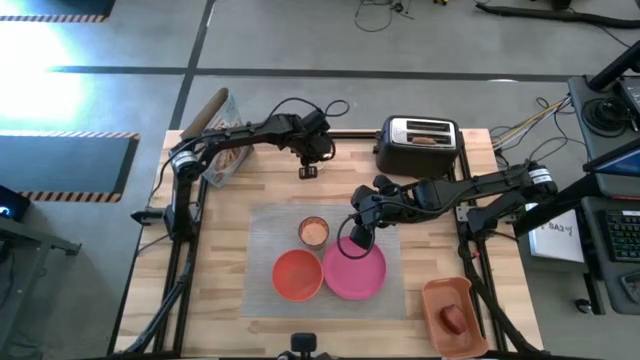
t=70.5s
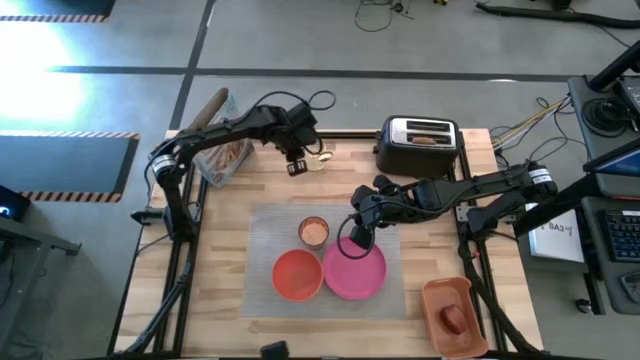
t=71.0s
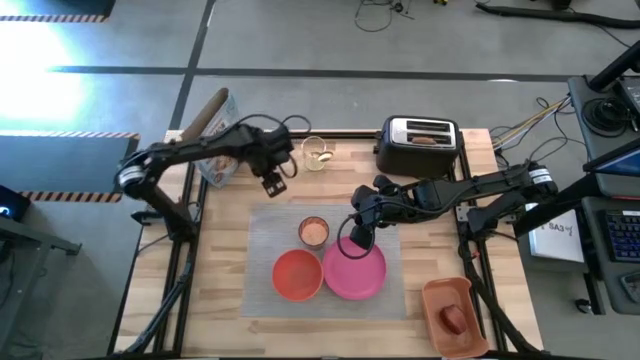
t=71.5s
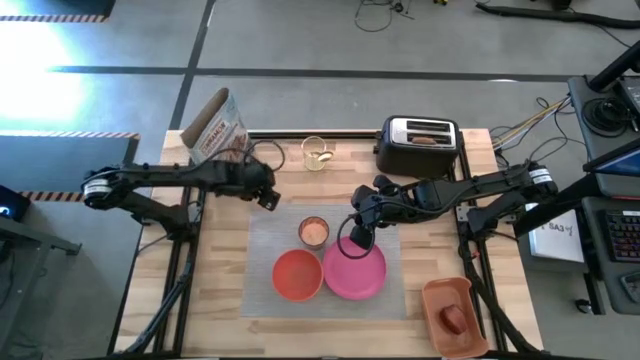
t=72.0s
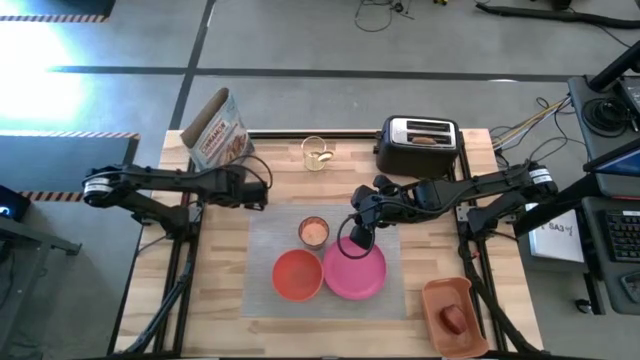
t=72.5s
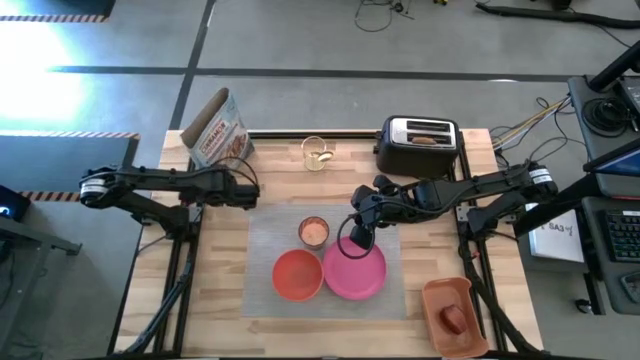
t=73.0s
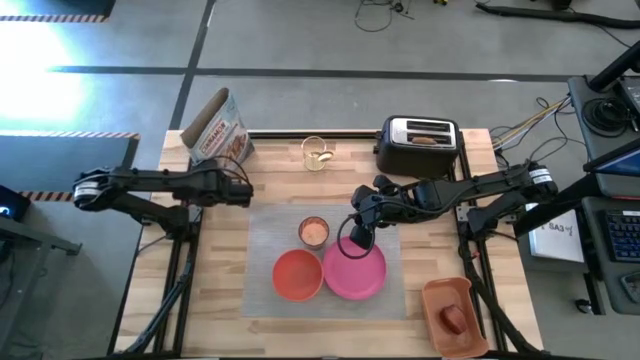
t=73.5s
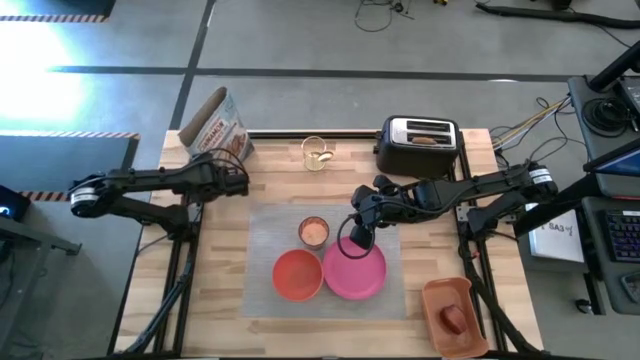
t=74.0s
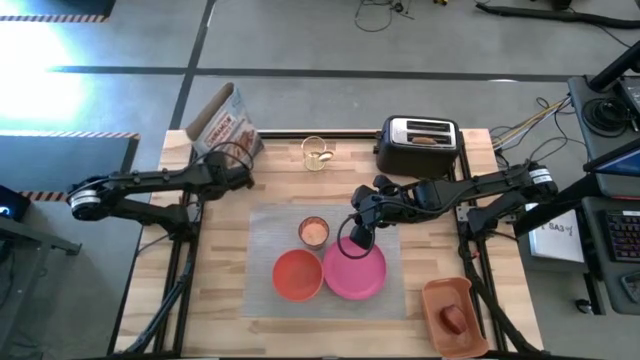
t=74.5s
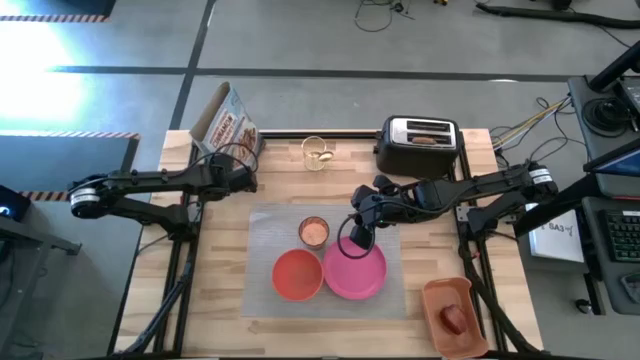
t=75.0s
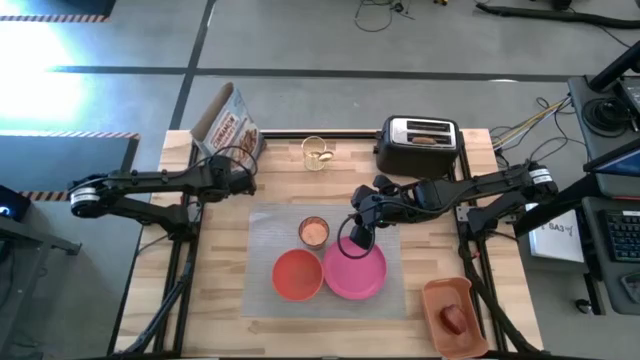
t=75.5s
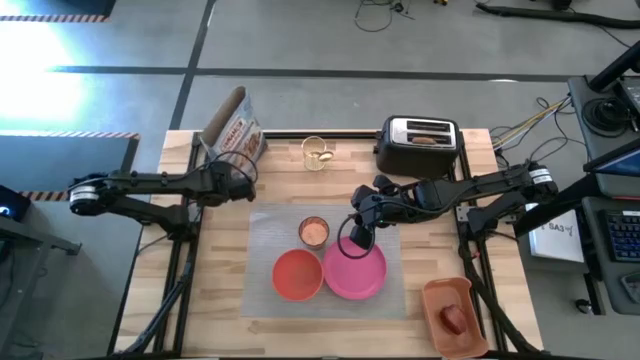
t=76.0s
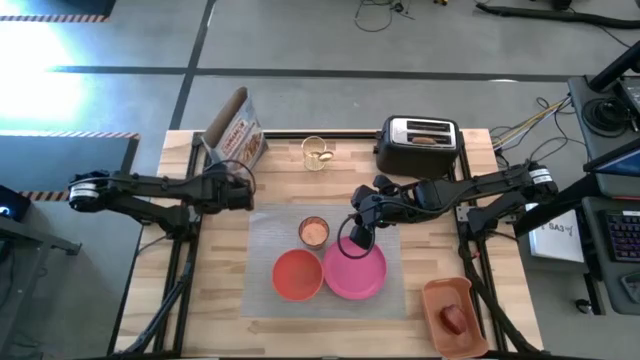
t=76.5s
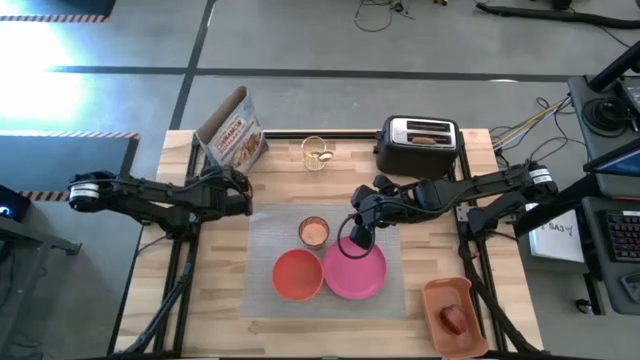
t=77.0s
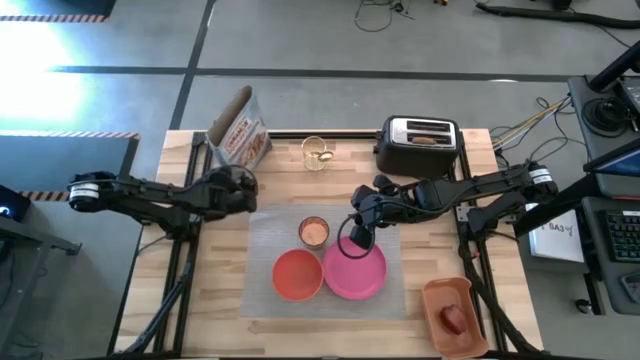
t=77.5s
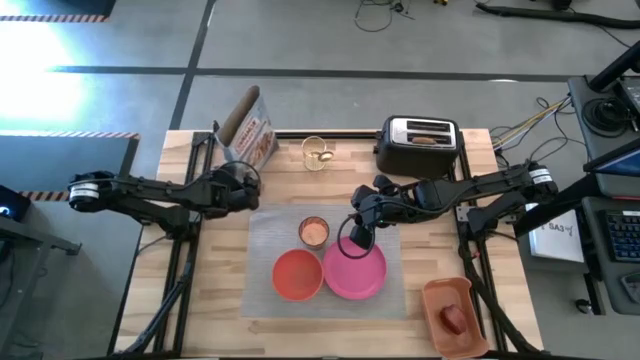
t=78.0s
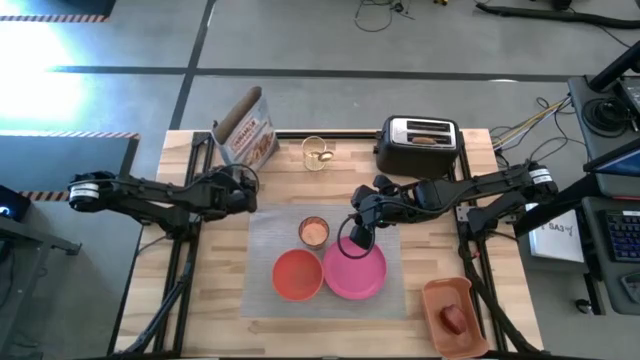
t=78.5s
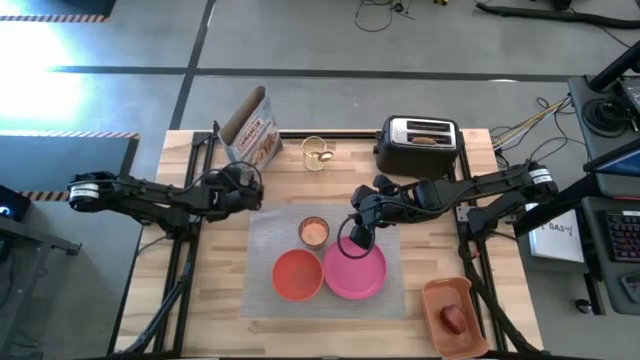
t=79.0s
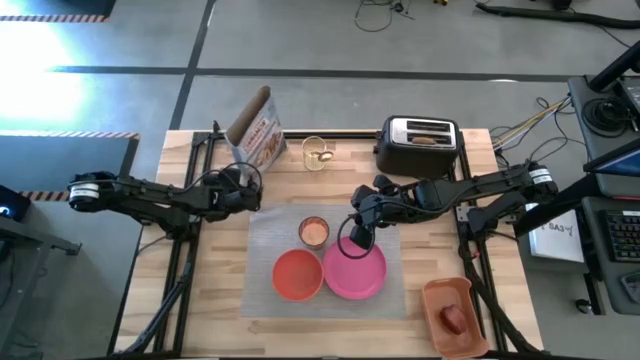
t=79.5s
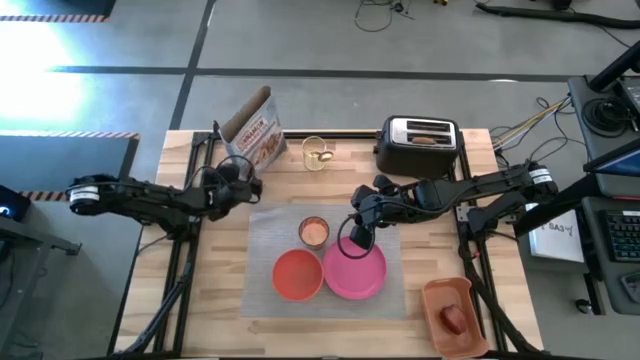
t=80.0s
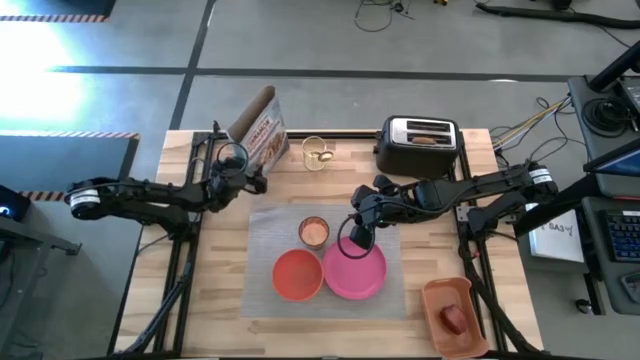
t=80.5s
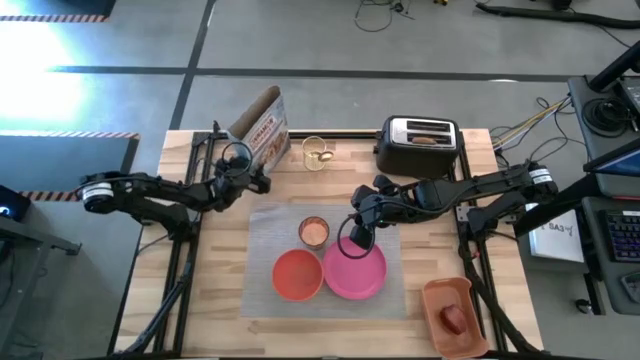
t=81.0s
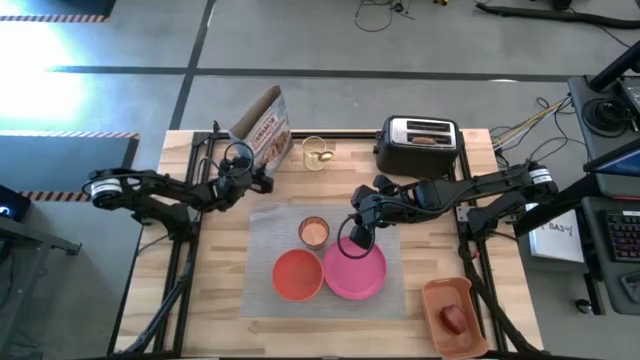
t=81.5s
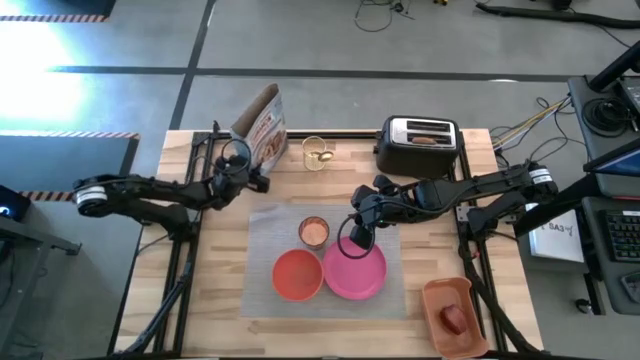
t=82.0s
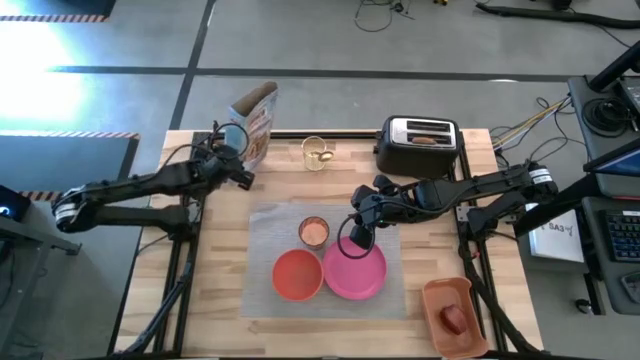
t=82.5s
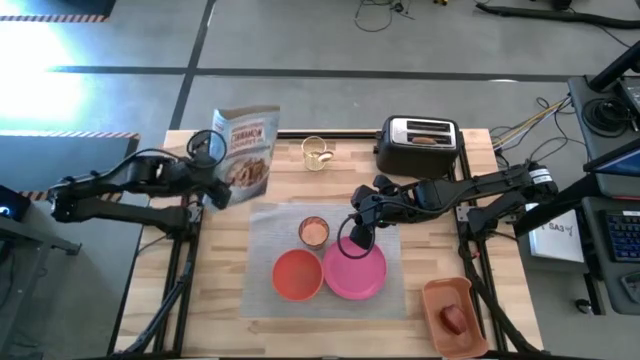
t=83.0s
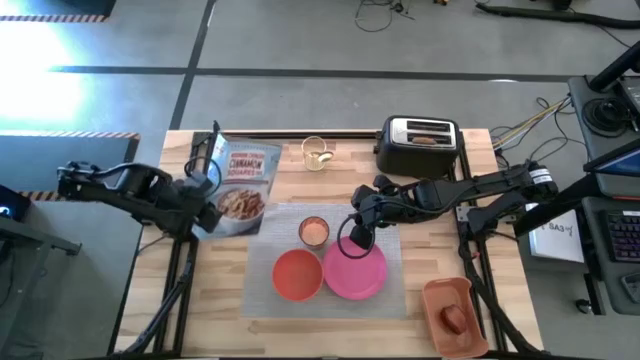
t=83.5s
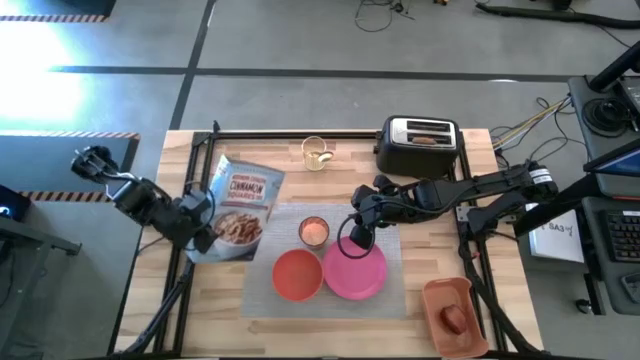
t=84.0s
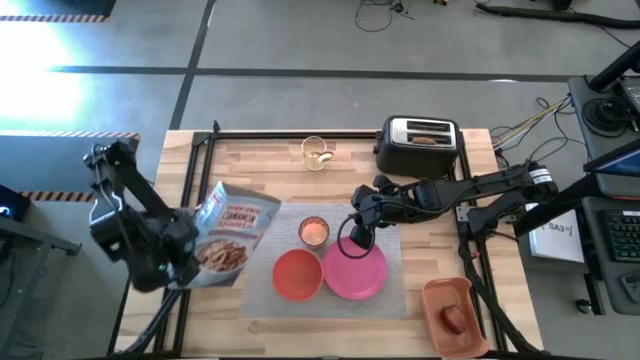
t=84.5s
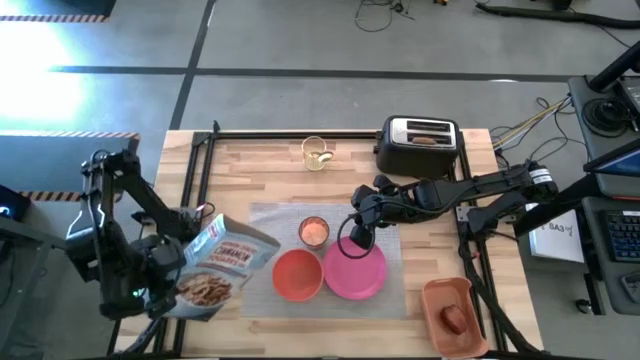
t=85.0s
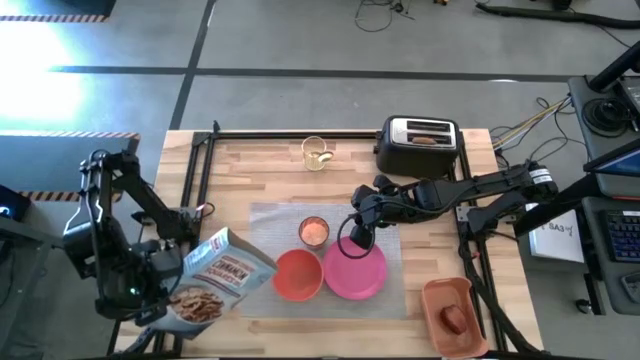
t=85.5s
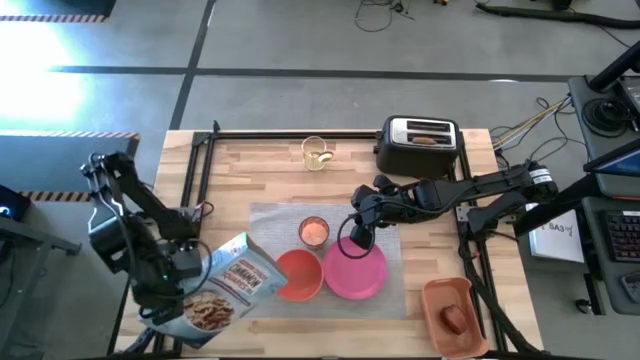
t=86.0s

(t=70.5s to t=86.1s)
Task: Arrange a breakfast setting
Pour the cereal from the blue cereal box into the orange bowl

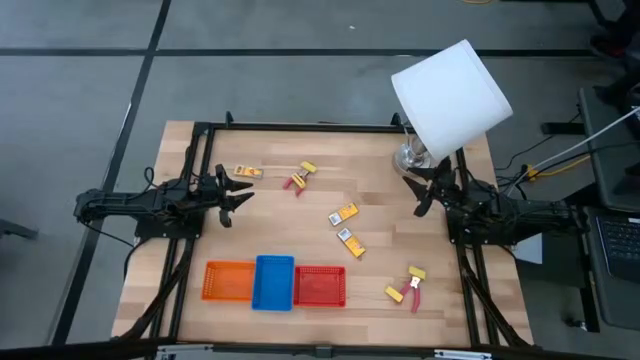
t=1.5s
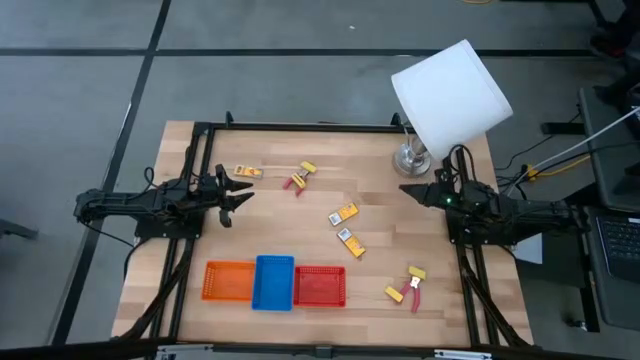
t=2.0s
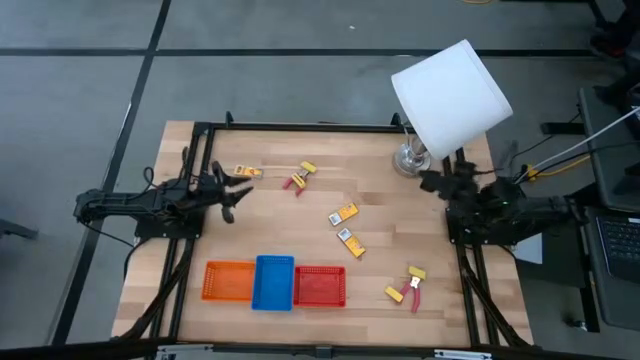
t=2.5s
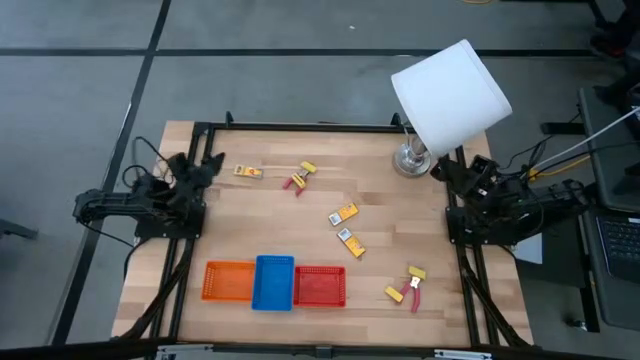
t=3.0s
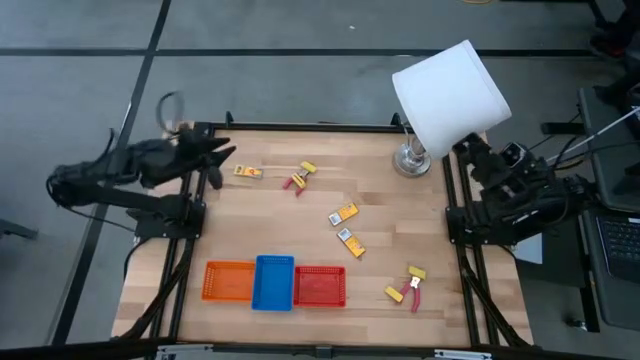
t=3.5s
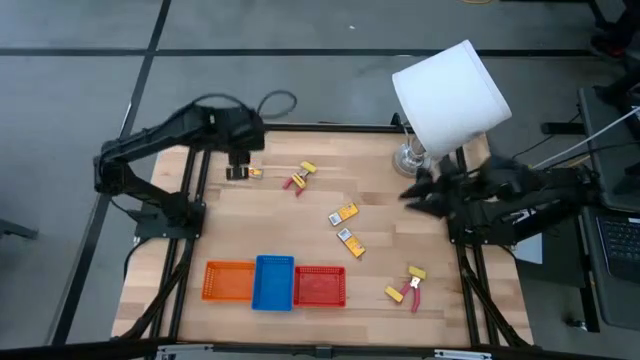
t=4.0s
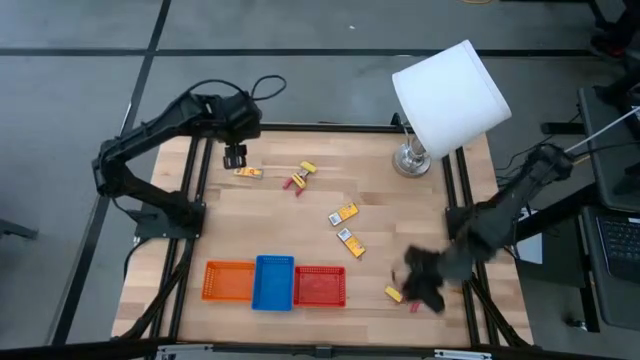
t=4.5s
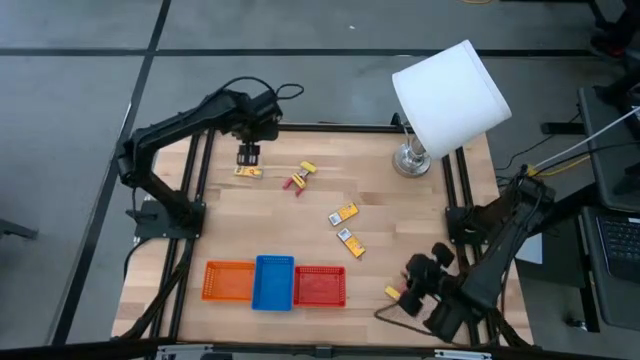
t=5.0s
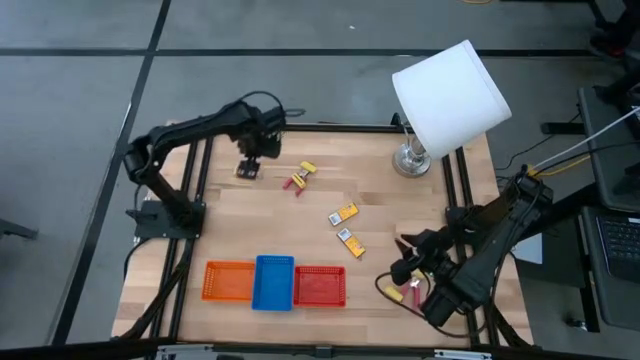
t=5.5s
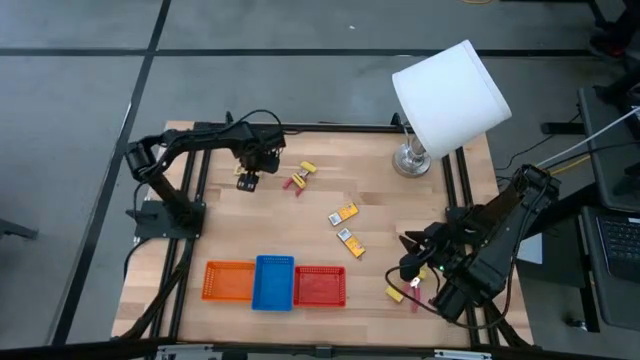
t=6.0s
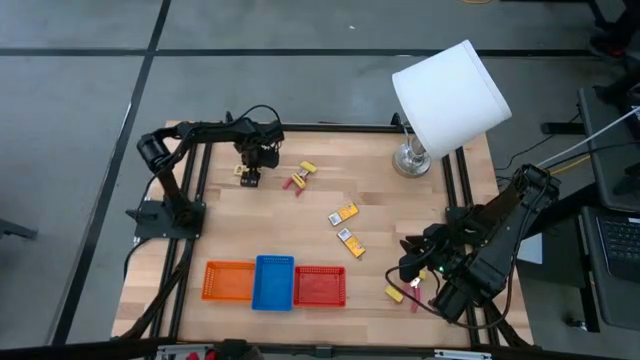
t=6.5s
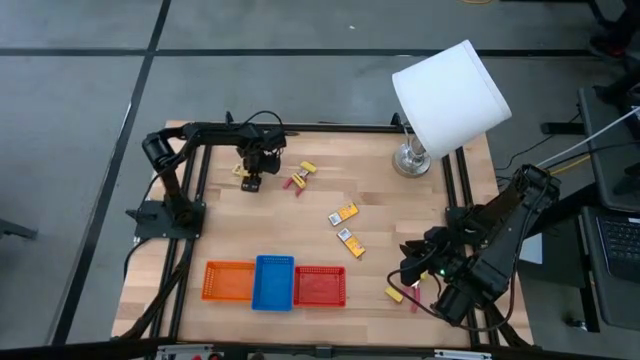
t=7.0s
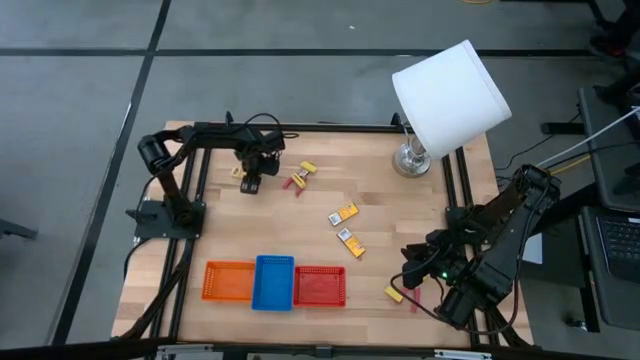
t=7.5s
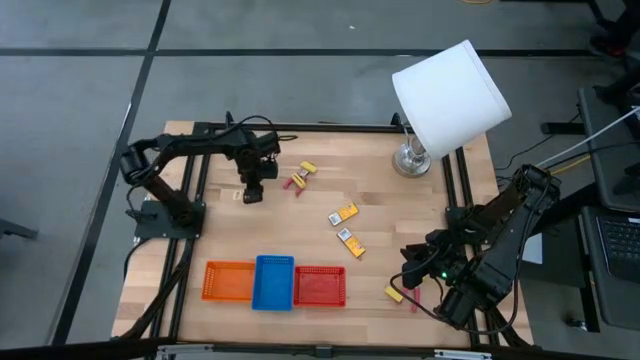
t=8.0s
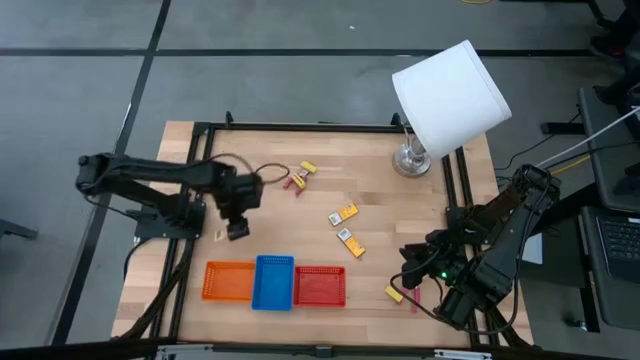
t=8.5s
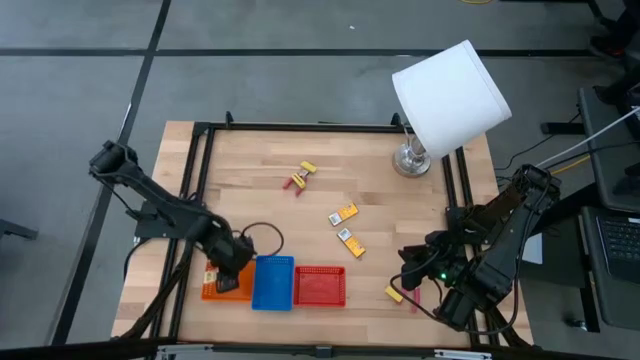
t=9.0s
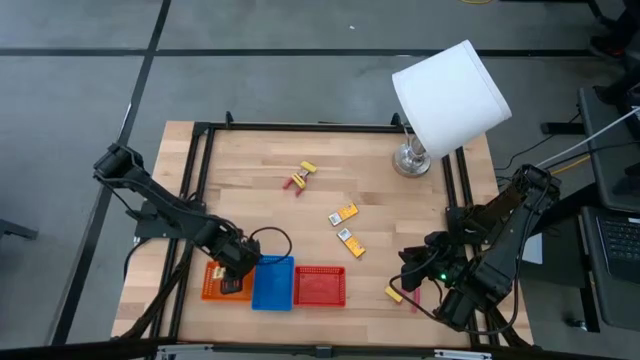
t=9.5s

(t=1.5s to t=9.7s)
Task: Pick & Place School Supplies
Put the top right crayon box into the orange bin
